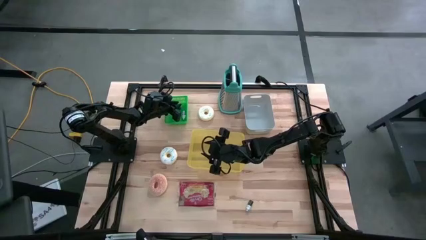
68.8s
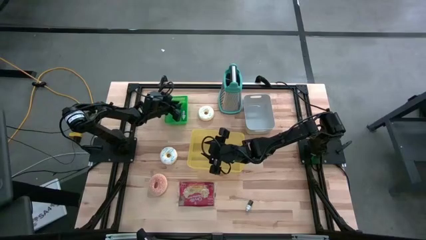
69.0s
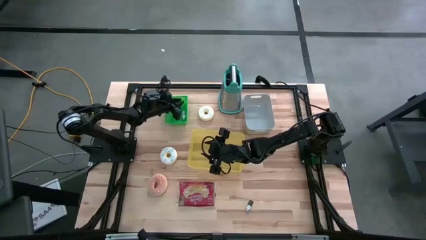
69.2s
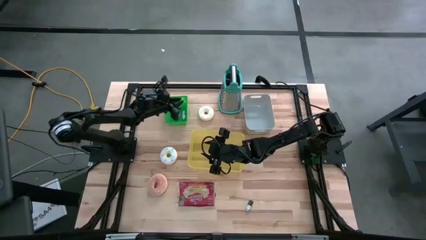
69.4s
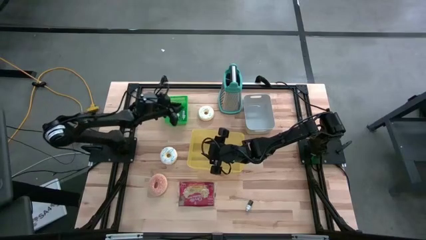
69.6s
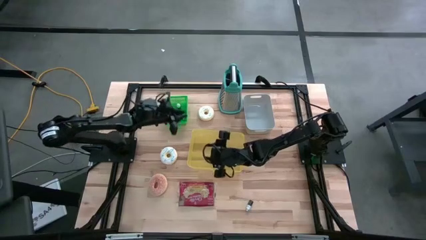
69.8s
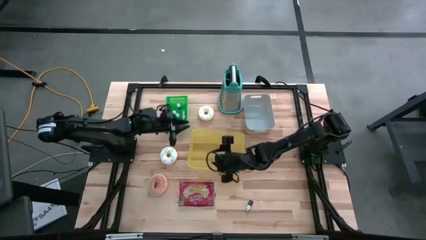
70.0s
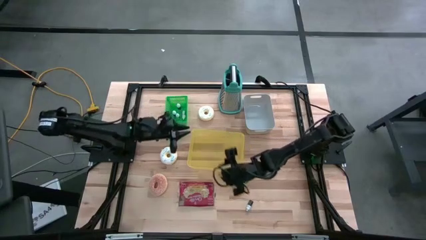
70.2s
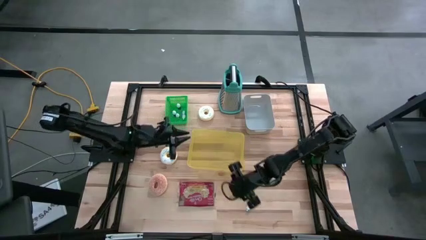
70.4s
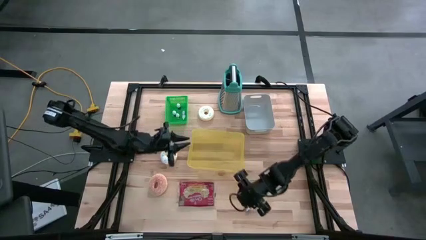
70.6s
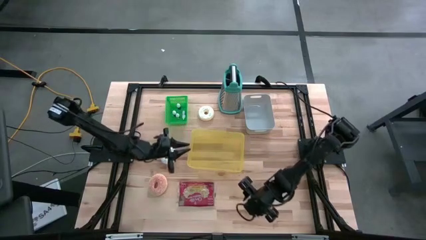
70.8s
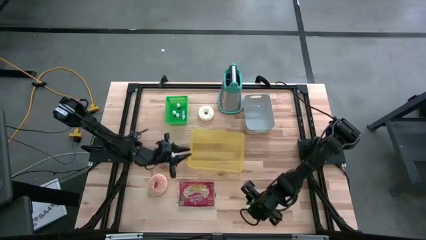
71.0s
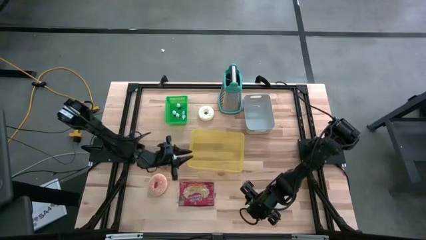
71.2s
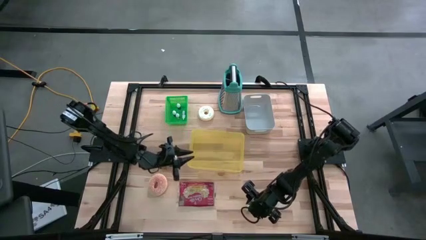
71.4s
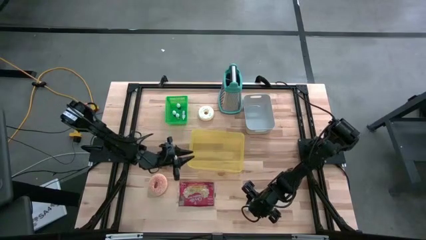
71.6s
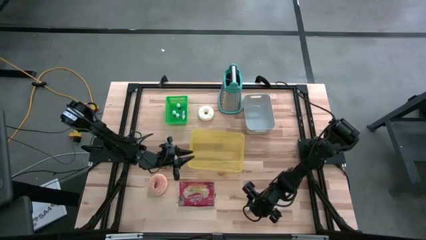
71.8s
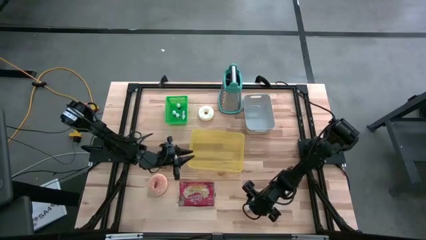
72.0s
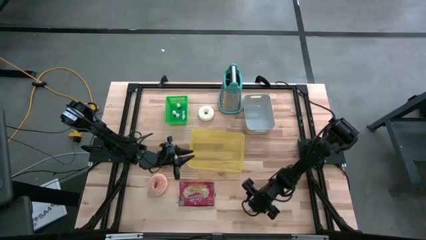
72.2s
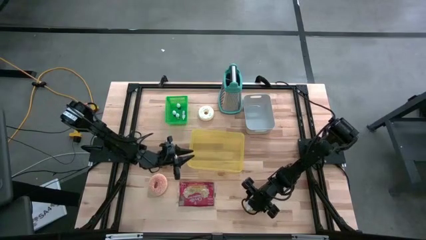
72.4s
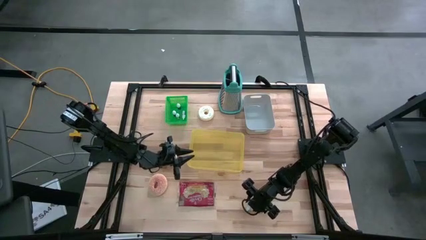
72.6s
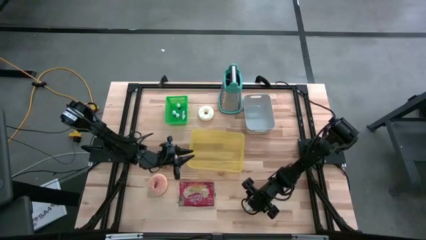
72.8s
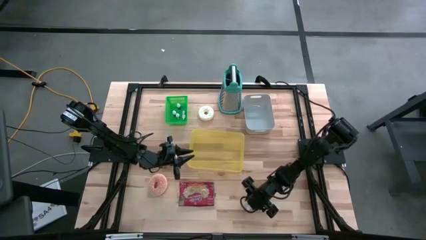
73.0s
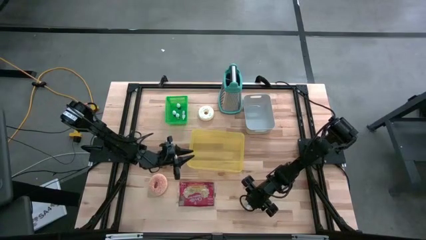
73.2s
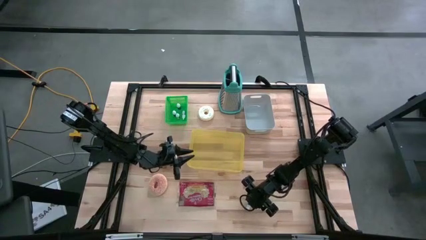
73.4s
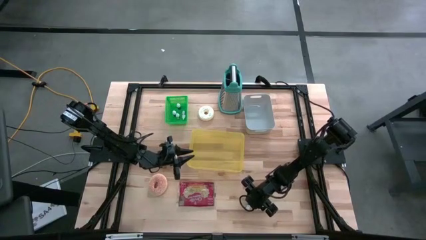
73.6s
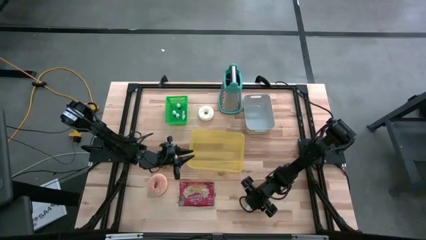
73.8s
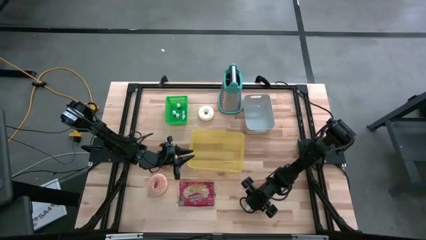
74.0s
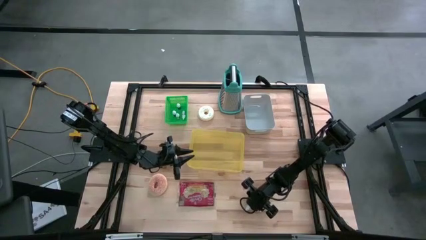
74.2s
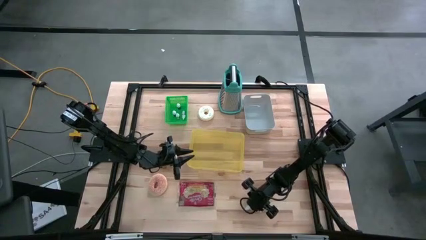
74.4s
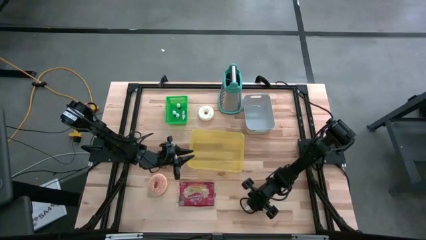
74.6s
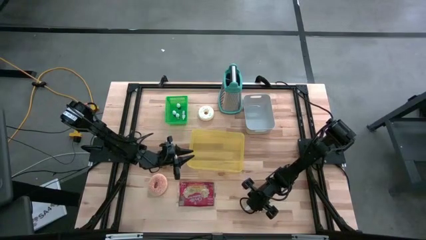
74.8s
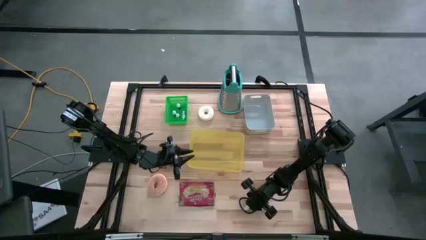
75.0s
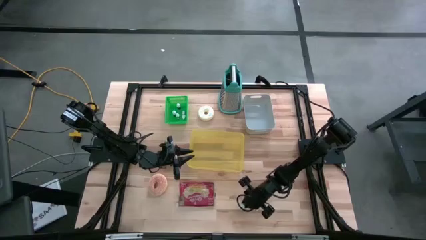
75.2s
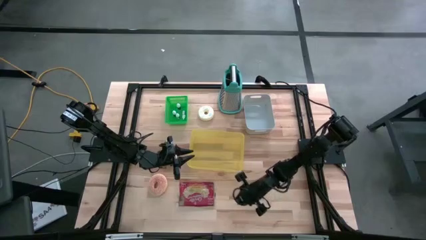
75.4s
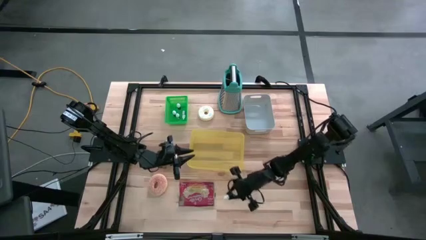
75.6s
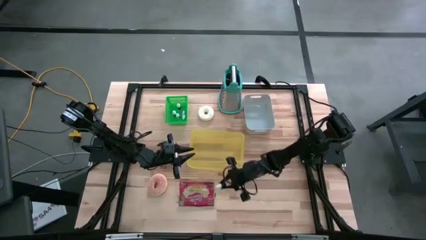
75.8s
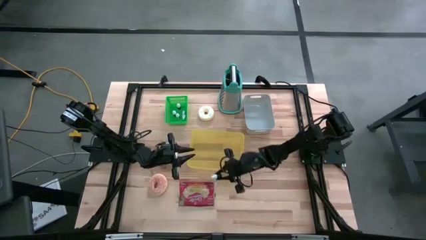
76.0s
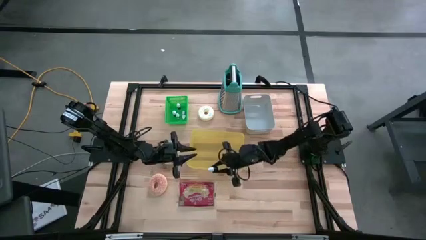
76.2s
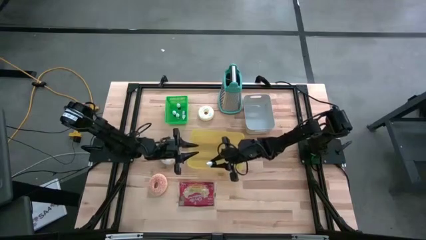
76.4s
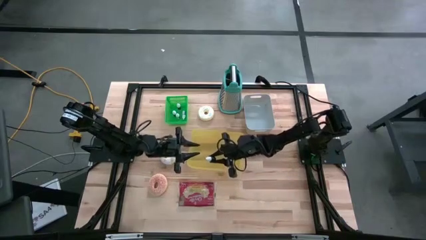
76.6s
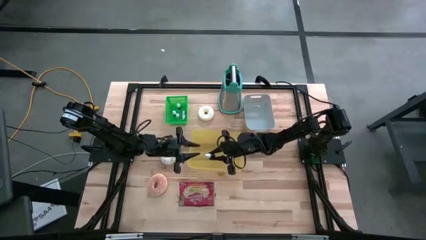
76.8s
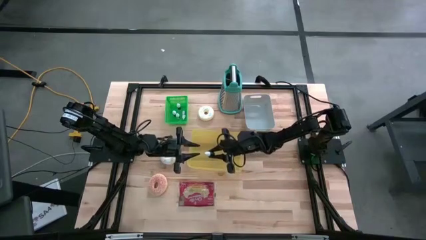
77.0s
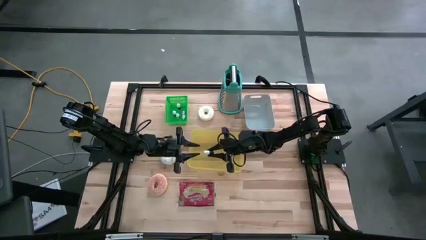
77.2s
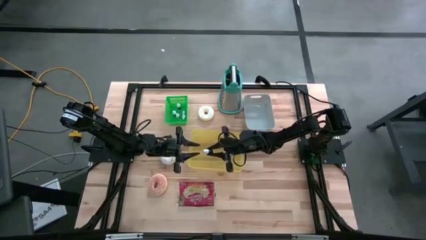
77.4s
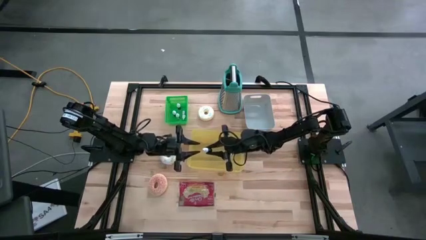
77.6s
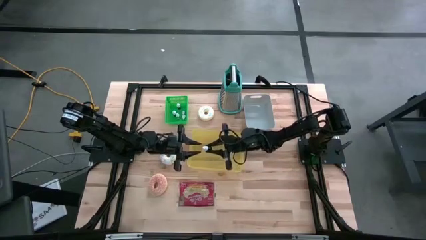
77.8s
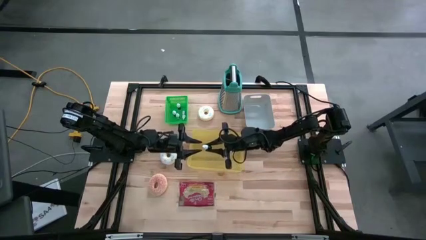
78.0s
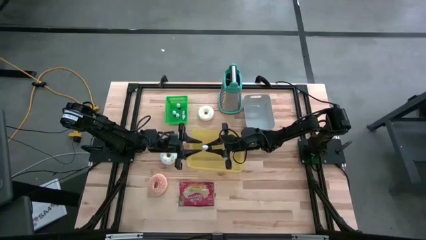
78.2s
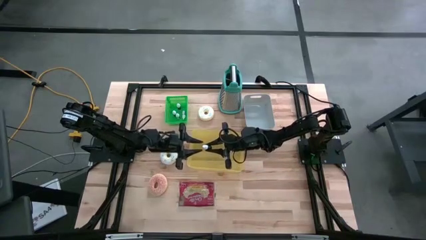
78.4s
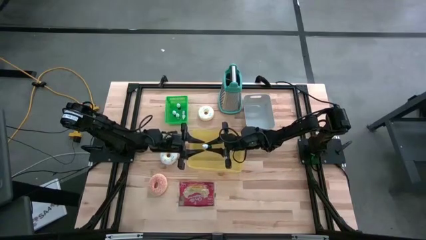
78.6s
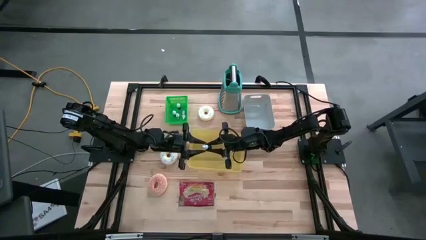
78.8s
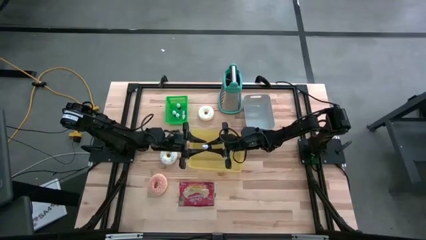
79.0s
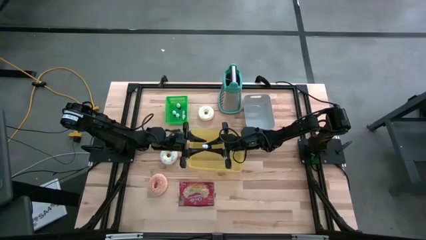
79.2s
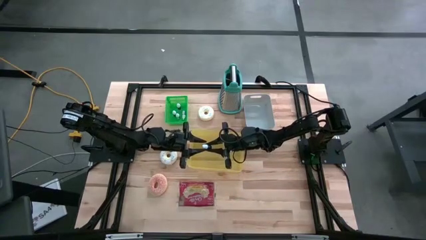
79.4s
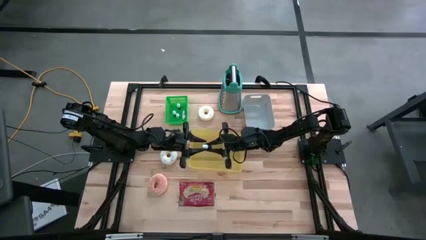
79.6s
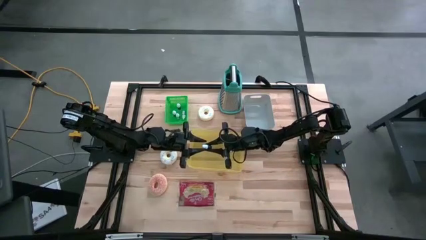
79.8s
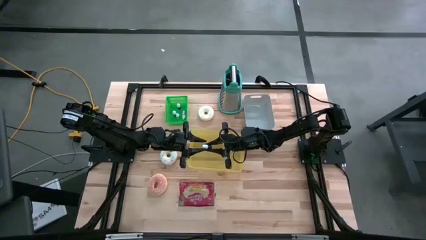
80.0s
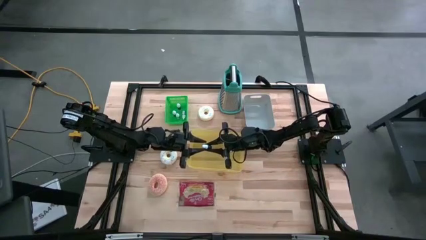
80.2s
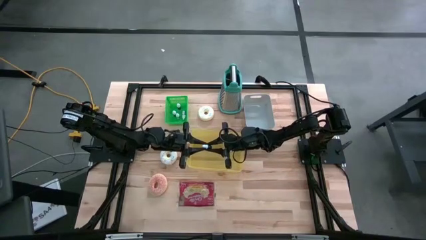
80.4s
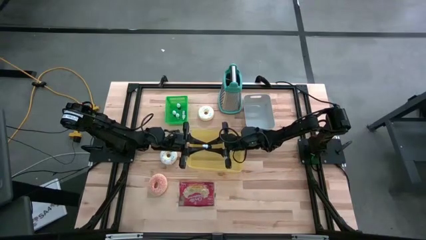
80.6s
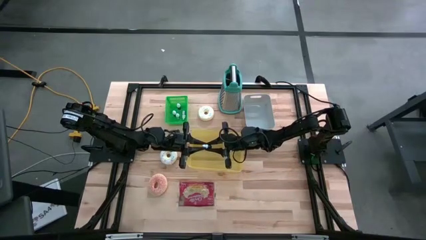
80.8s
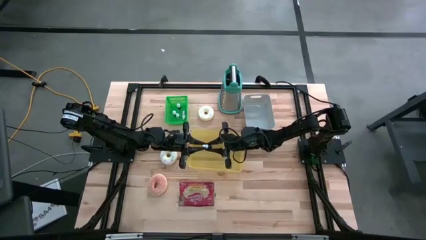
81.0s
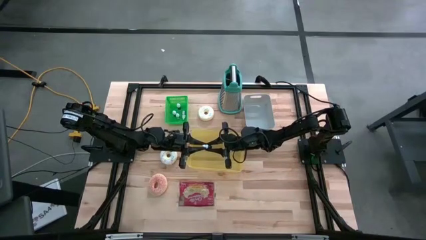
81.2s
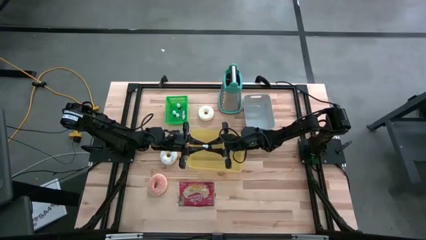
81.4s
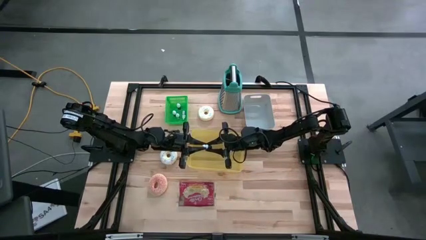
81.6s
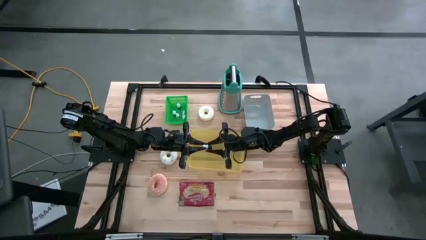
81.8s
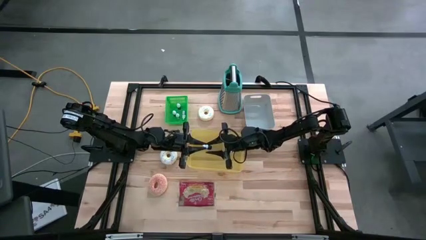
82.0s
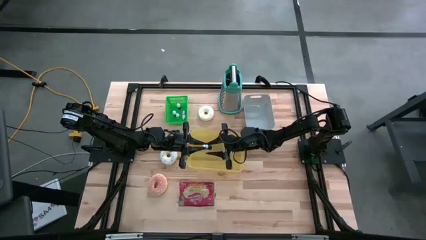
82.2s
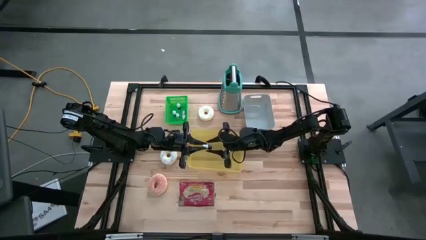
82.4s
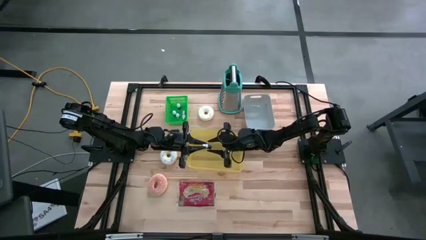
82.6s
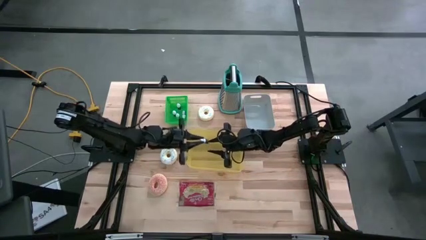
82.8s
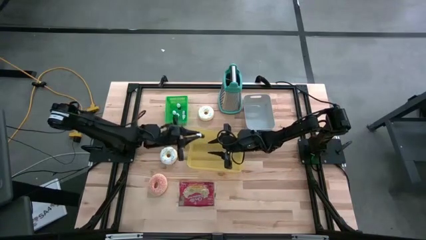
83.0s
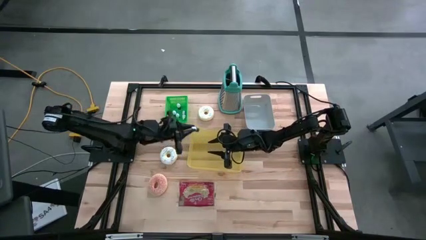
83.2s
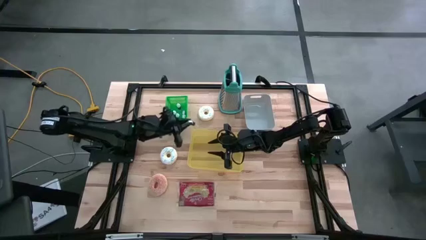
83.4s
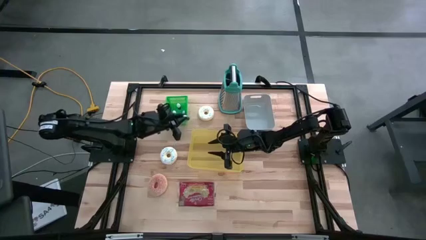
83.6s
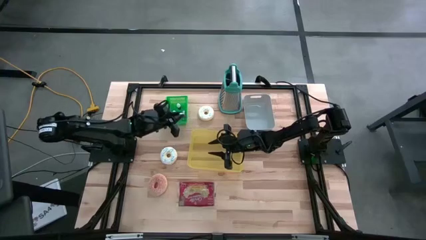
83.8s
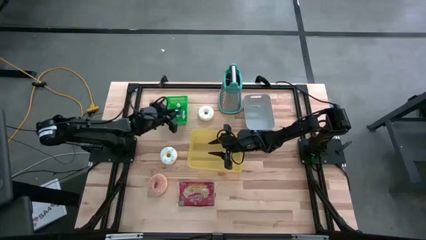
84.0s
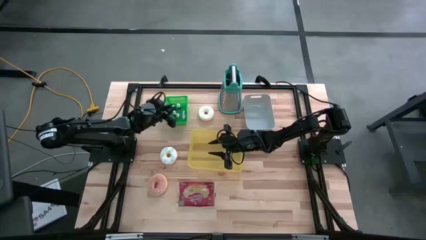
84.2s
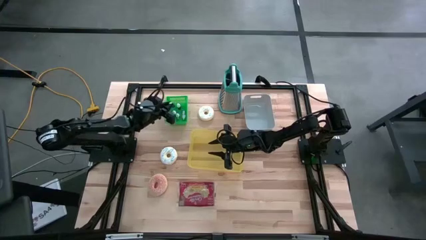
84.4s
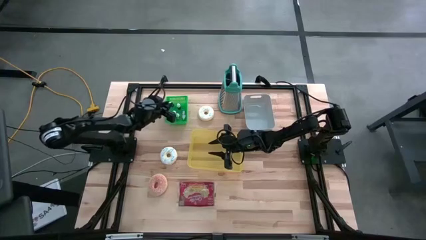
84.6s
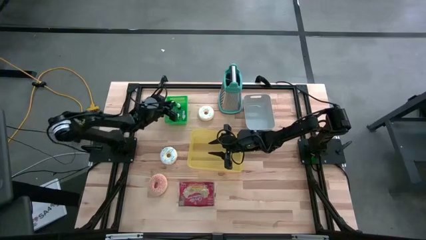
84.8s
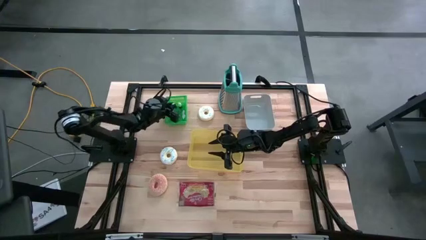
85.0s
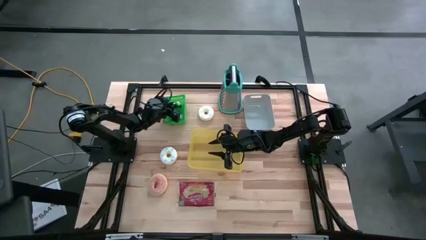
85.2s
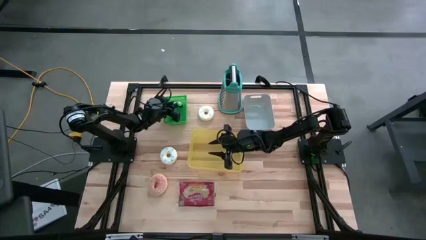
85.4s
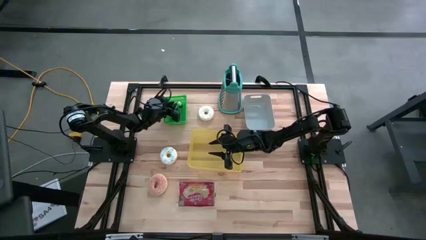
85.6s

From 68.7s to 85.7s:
Put the green food coloring bottle into the green bin
